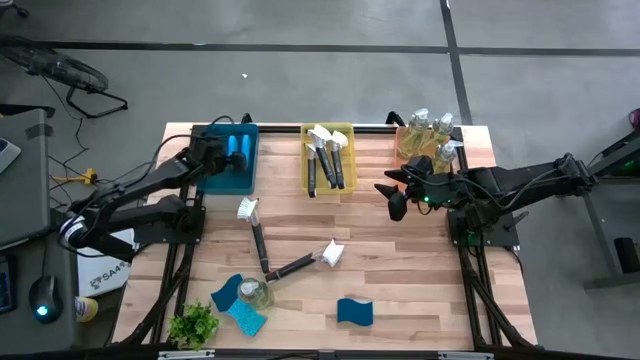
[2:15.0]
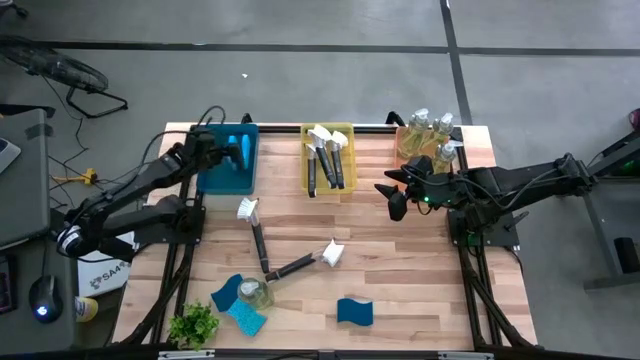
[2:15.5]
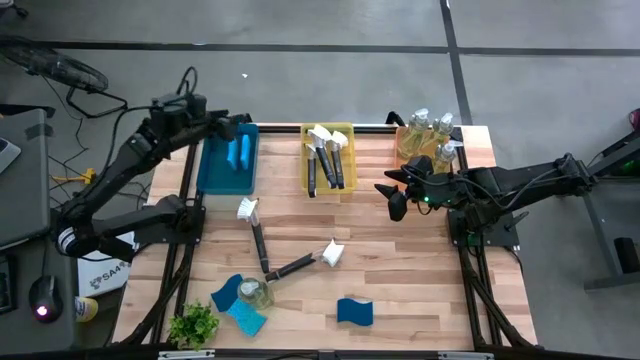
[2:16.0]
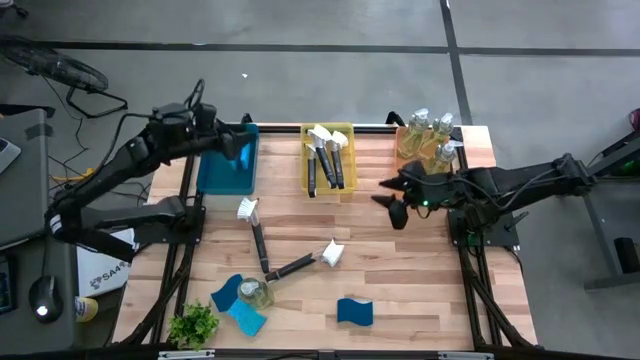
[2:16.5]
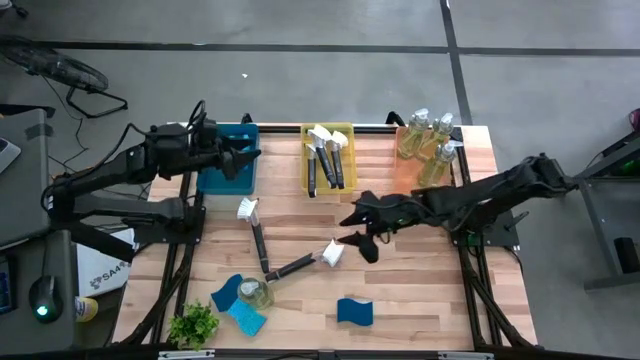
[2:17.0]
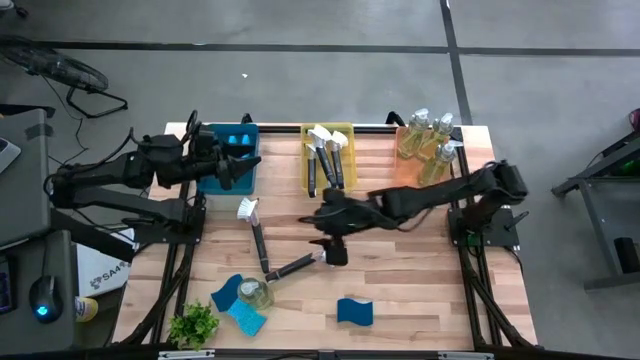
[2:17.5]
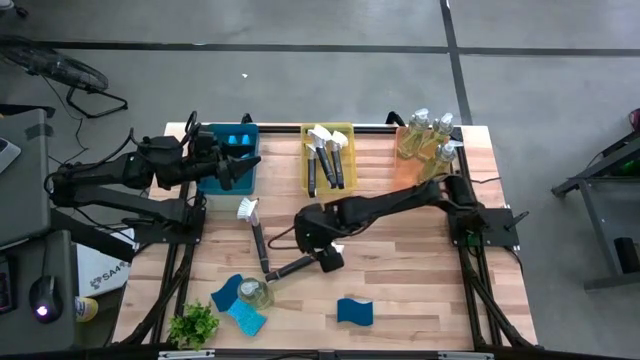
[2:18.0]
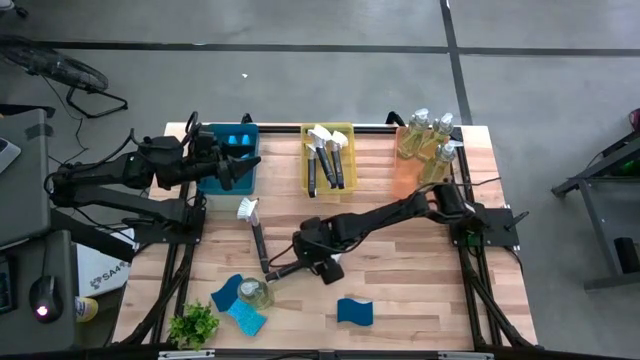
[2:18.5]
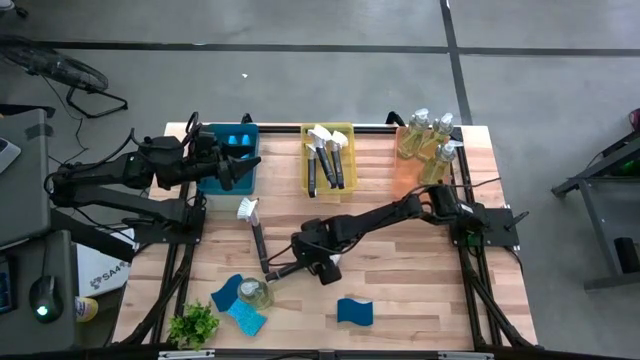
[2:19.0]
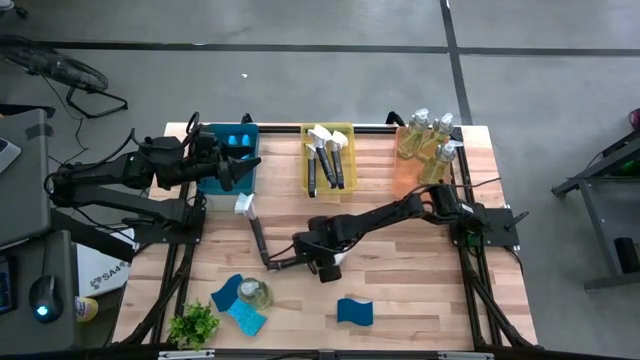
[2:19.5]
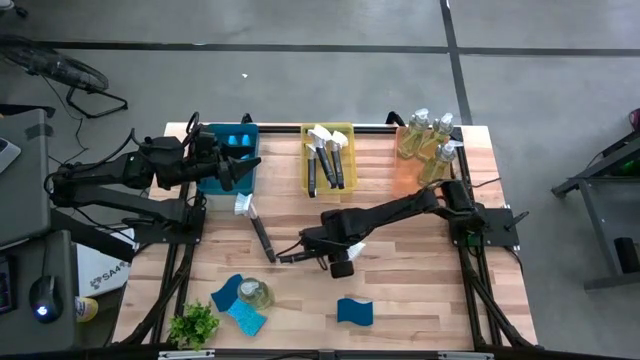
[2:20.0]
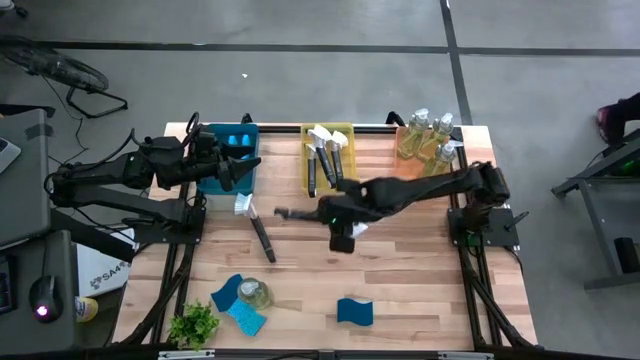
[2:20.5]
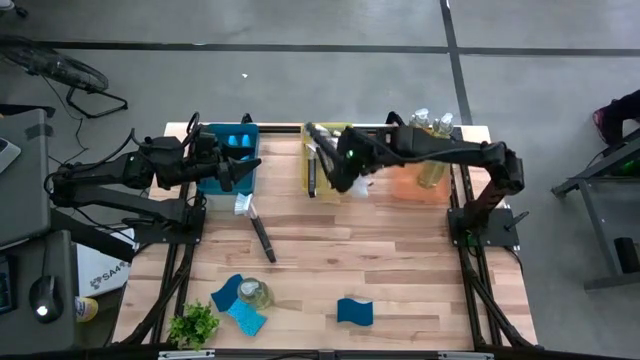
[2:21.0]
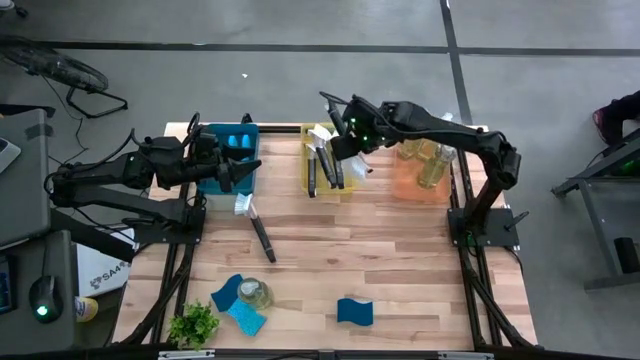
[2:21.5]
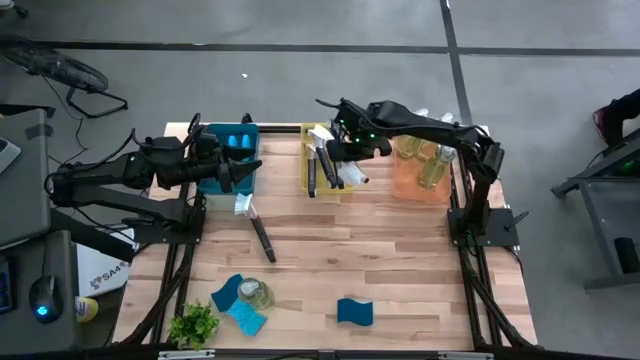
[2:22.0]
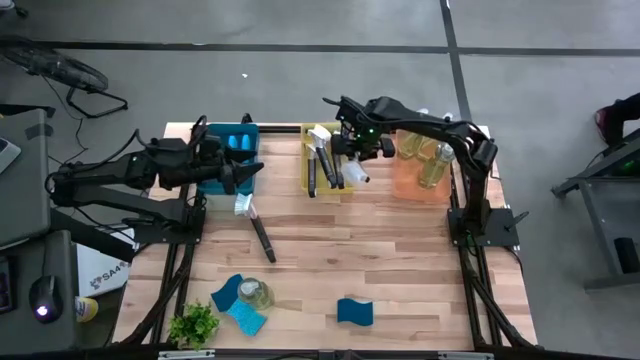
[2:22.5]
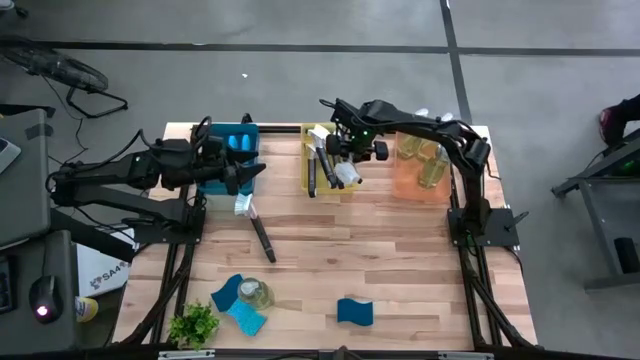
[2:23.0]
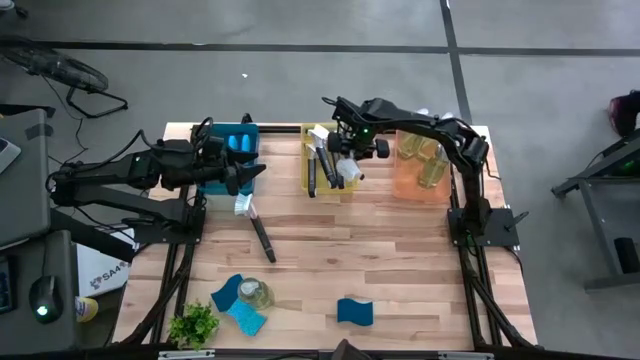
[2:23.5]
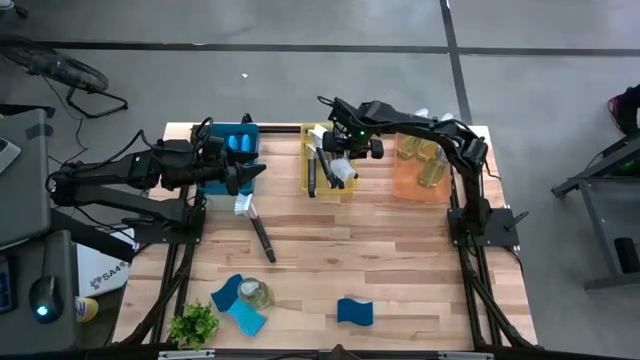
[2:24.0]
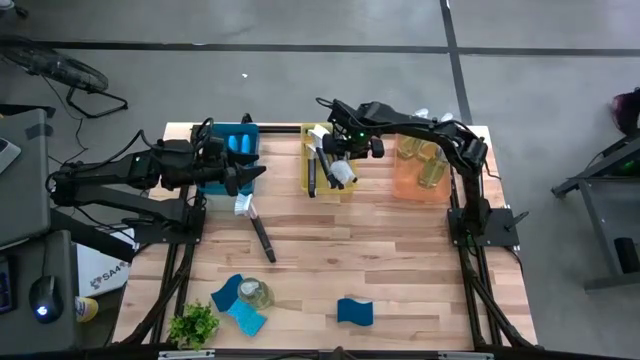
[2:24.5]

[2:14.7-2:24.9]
Task: Pick & Place Kitchen Sink Supplies
Put the black dishwashing brush into the yellow bin

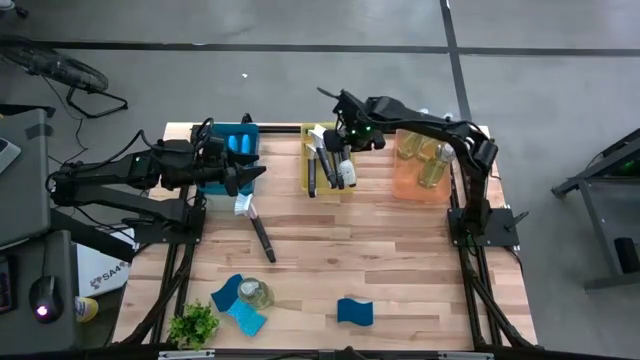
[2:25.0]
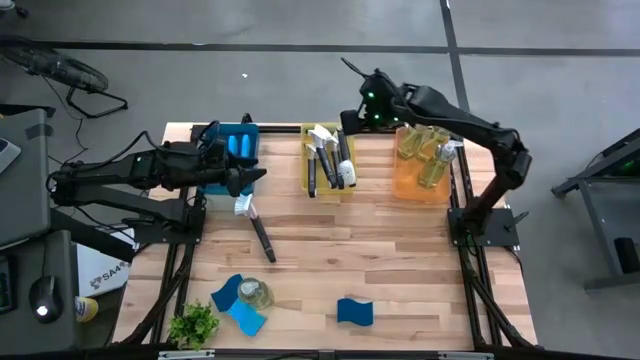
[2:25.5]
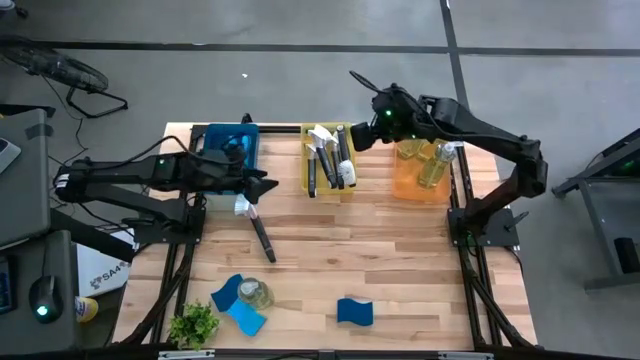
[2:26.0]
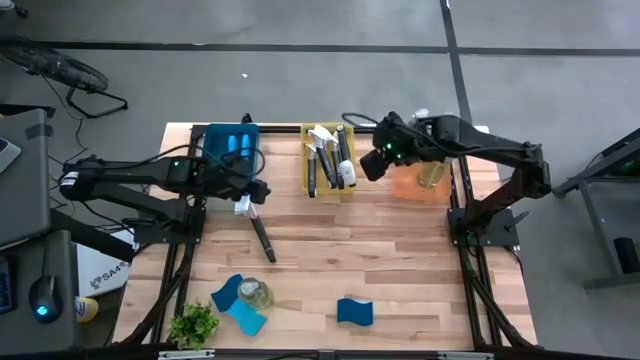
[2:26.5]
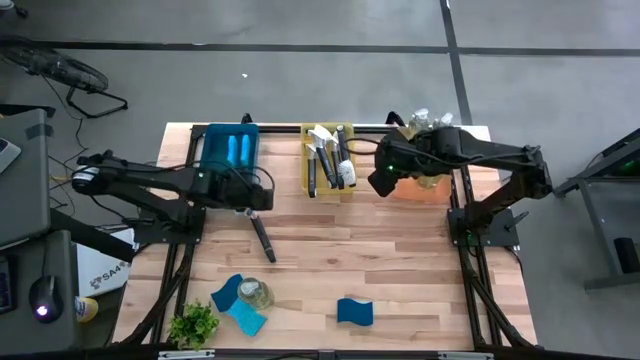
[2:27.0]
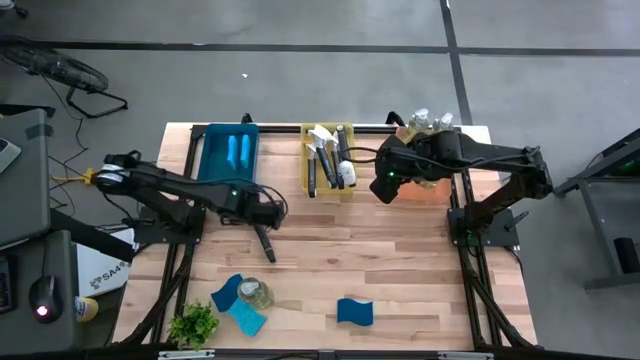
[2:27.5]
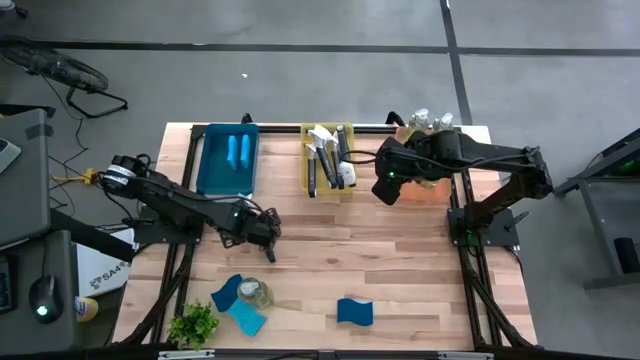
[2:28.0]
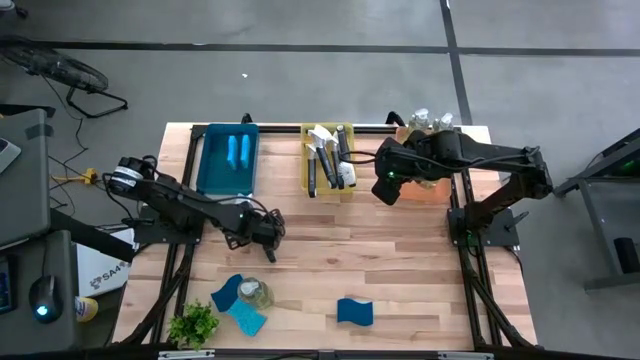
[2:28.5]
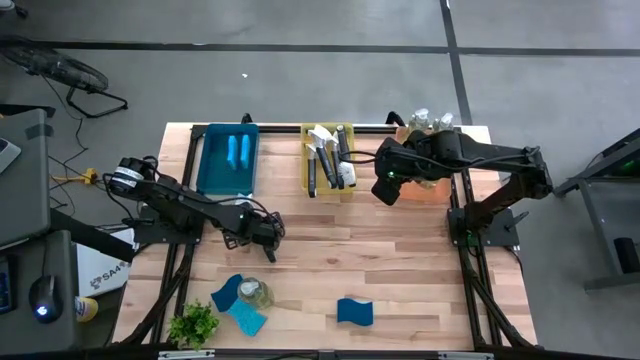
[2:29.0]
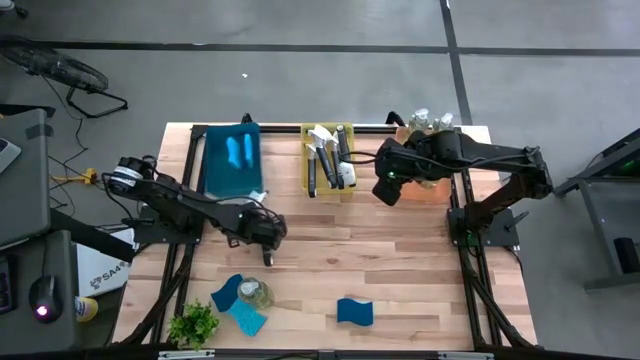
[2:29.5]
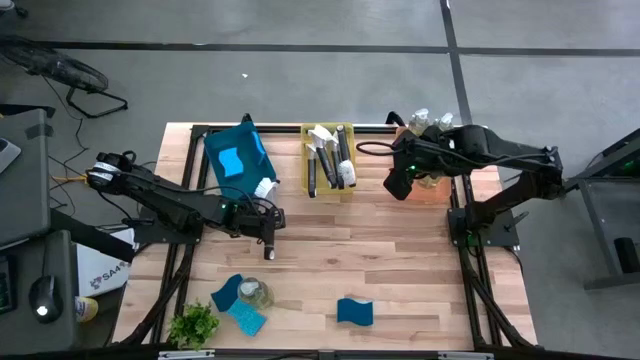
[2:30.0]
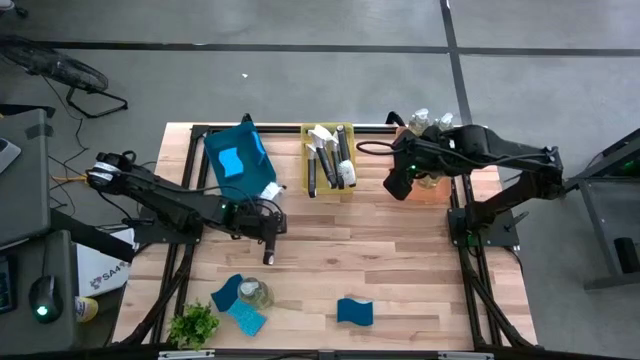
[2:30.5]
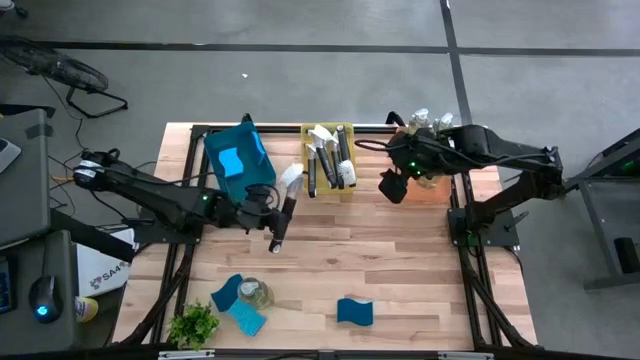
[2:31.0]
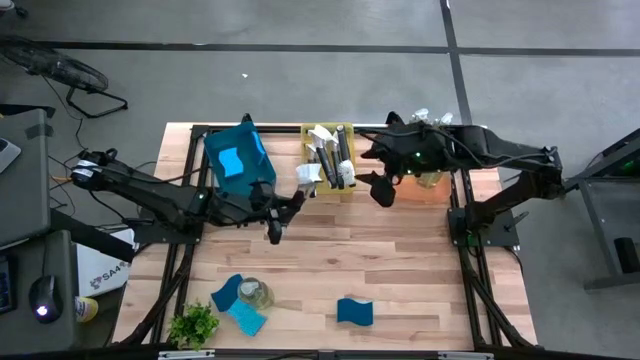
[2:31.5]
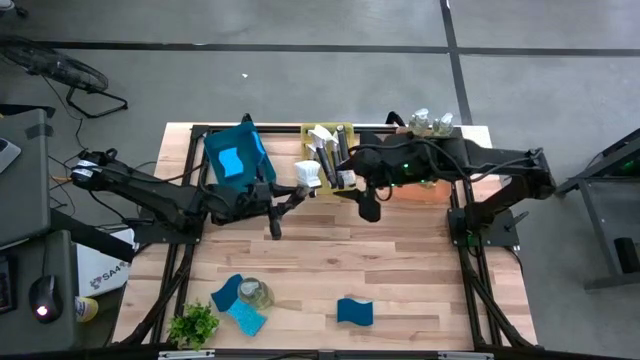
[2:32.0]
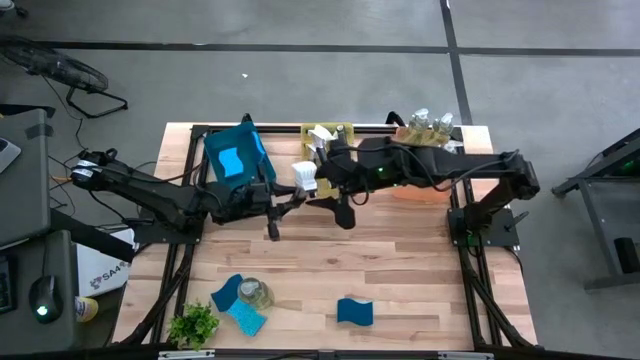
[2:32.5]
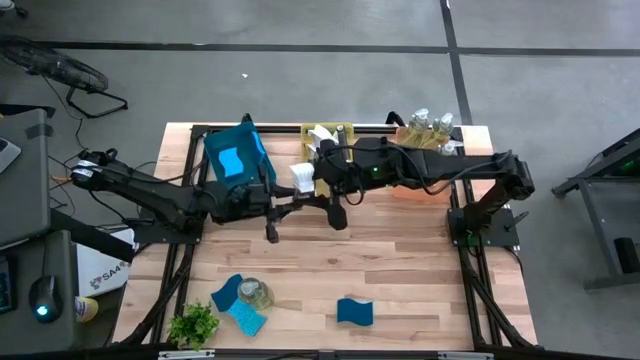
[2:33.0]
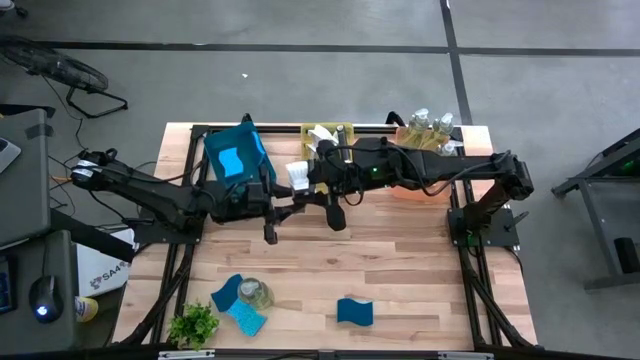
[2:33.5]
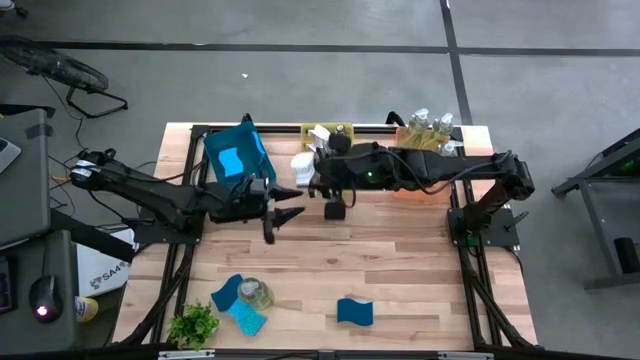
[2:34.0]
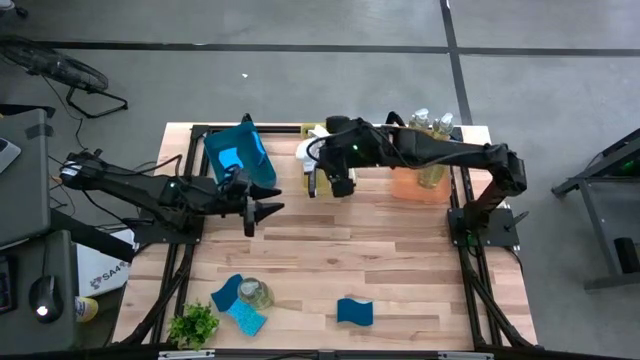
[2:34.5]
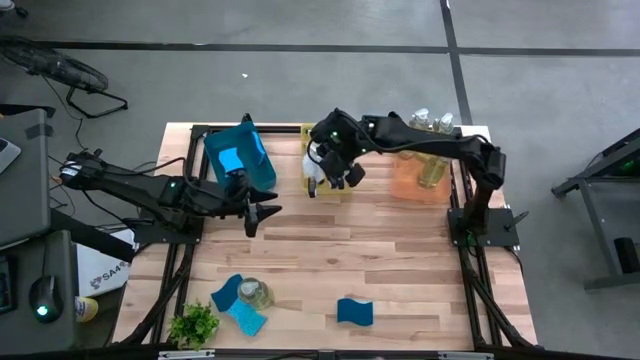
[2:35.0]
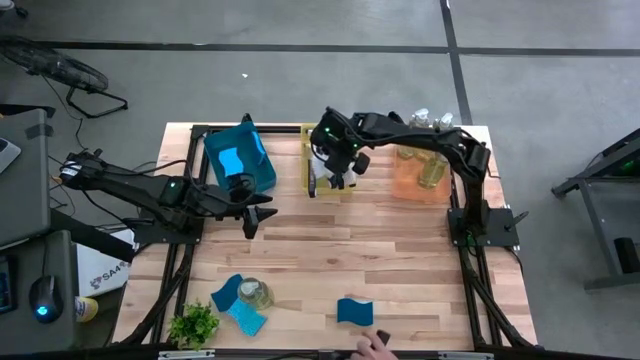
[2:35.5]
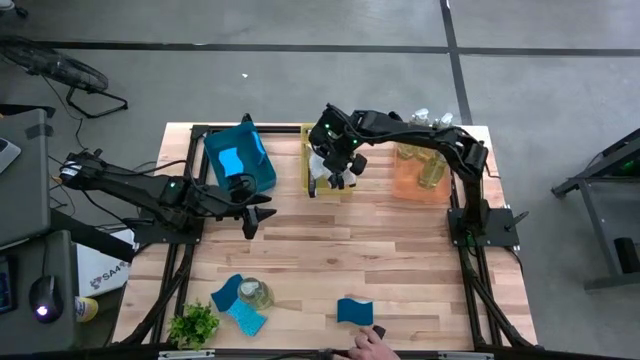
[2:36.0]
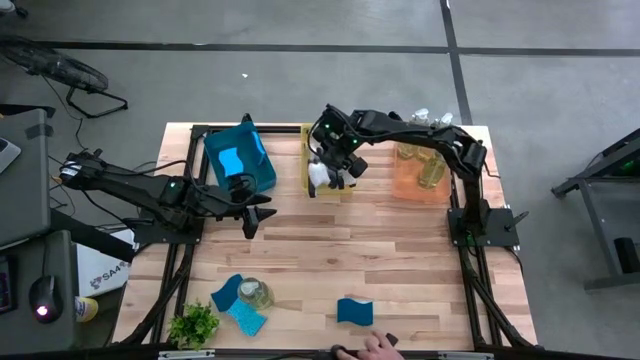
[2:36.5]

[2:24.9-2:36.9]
Put the black dishwashing brush into the yellow bin
